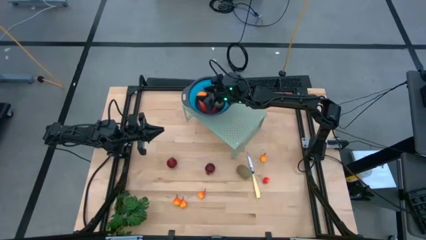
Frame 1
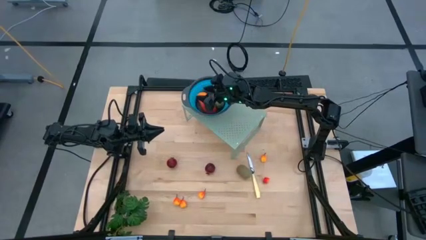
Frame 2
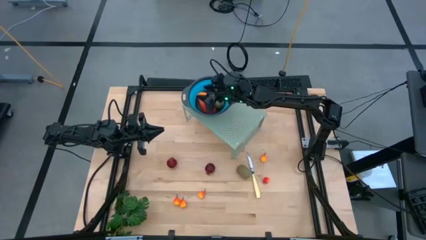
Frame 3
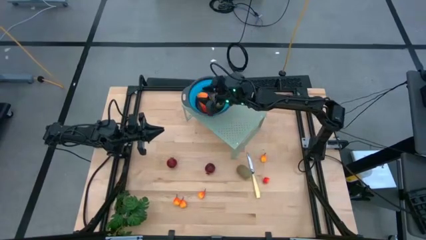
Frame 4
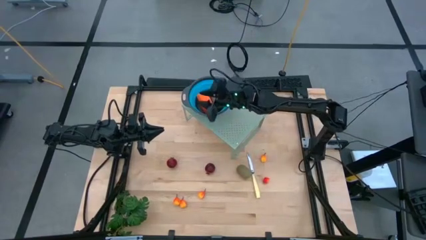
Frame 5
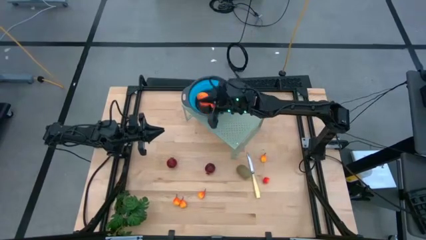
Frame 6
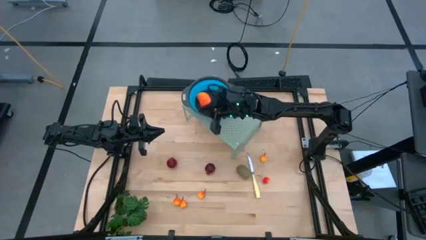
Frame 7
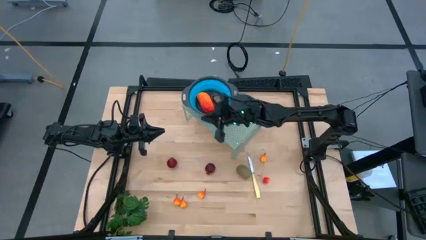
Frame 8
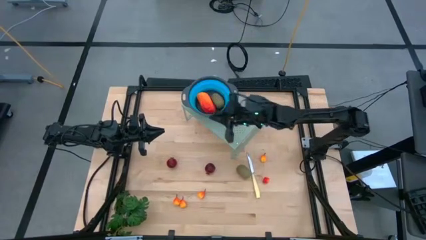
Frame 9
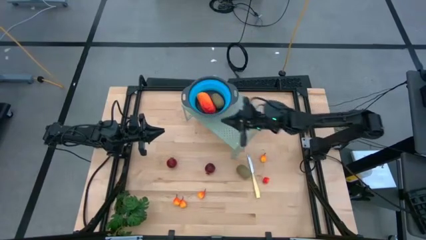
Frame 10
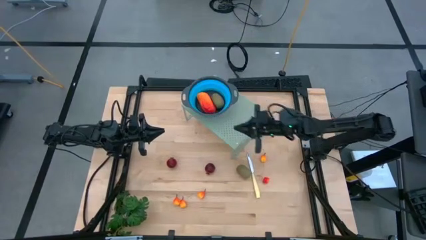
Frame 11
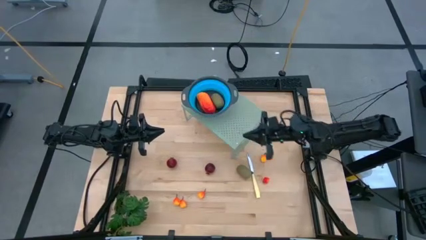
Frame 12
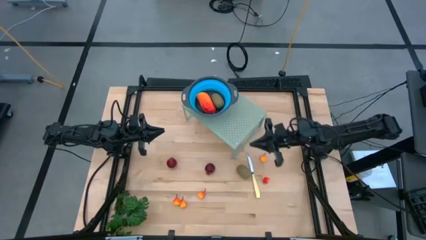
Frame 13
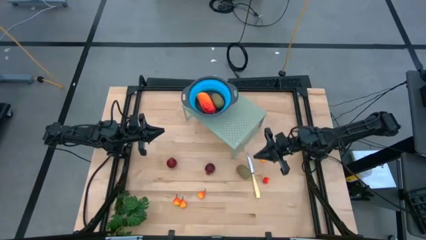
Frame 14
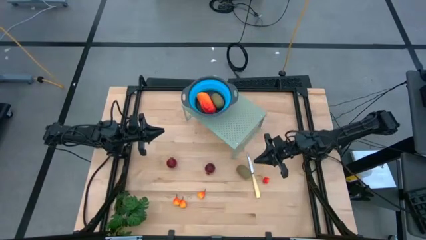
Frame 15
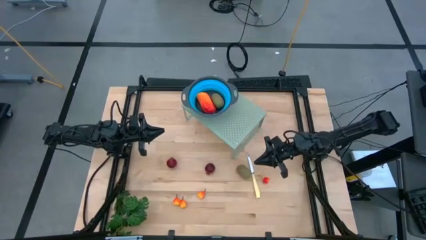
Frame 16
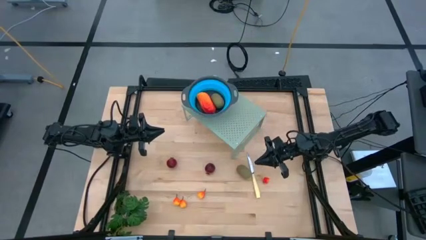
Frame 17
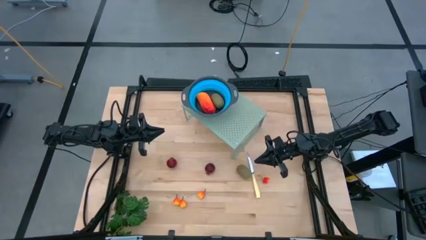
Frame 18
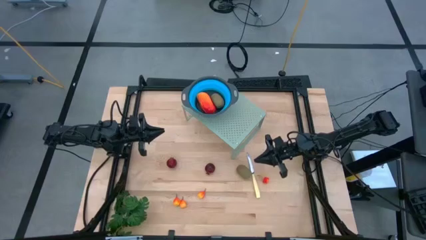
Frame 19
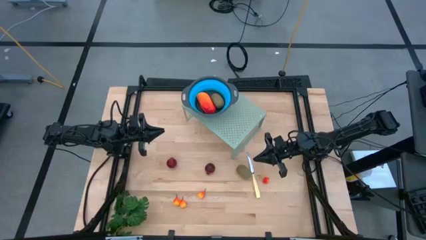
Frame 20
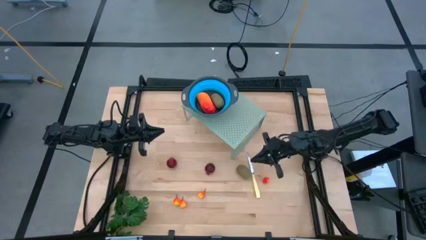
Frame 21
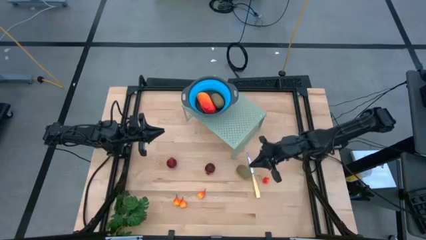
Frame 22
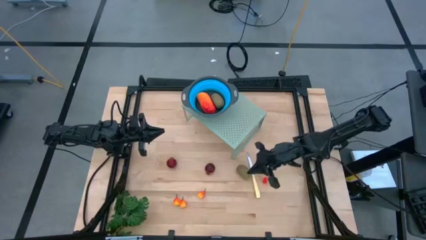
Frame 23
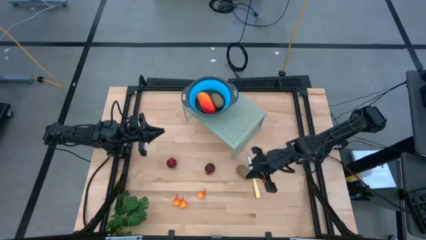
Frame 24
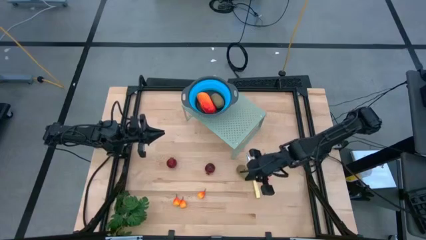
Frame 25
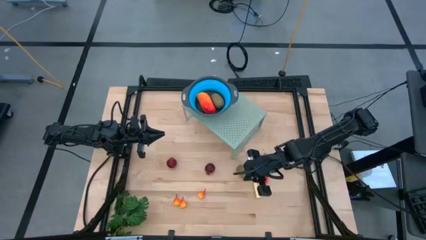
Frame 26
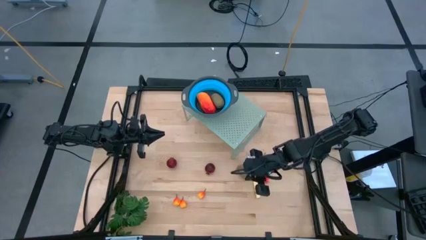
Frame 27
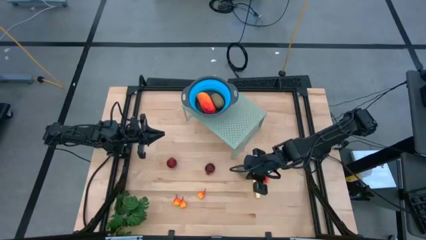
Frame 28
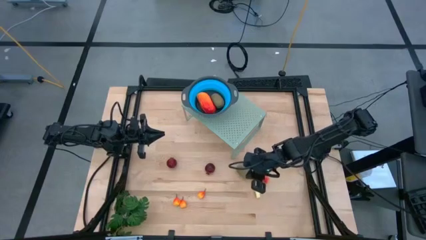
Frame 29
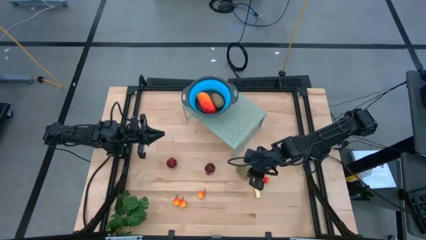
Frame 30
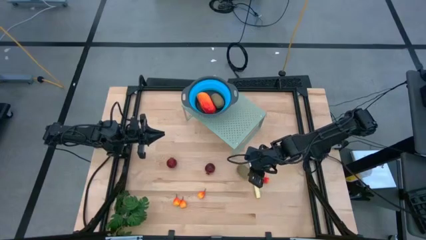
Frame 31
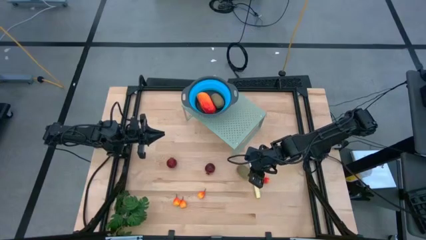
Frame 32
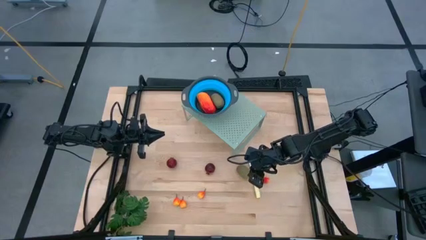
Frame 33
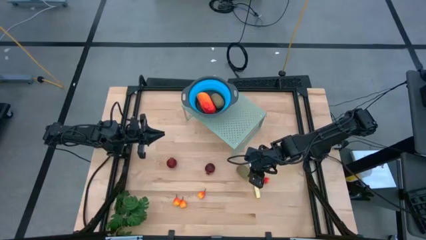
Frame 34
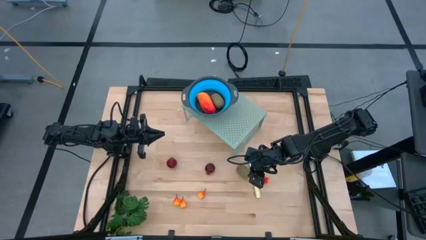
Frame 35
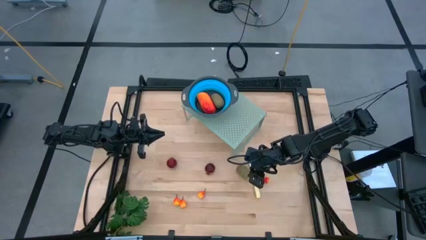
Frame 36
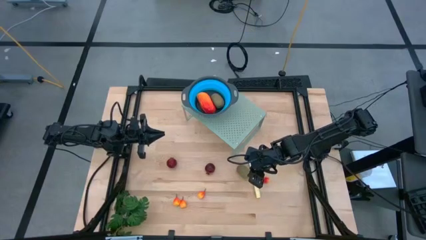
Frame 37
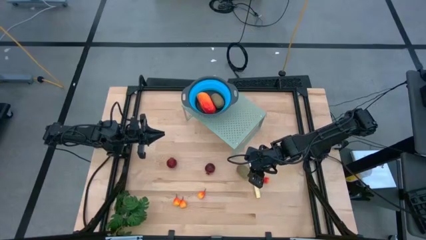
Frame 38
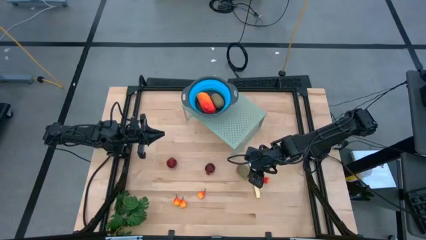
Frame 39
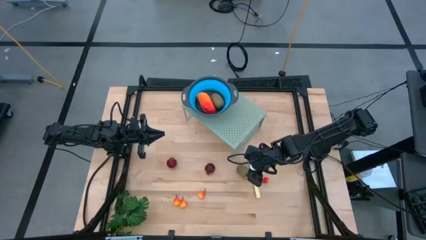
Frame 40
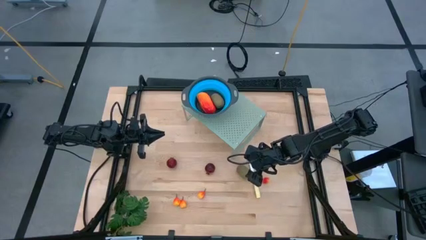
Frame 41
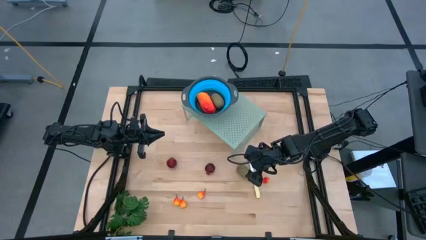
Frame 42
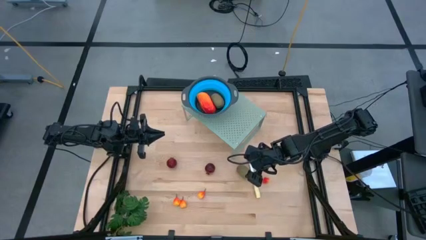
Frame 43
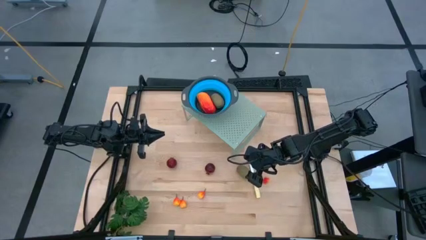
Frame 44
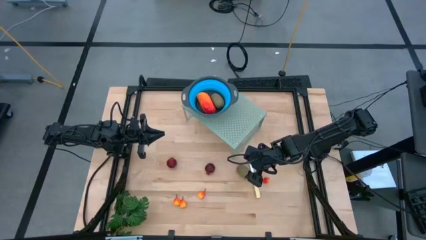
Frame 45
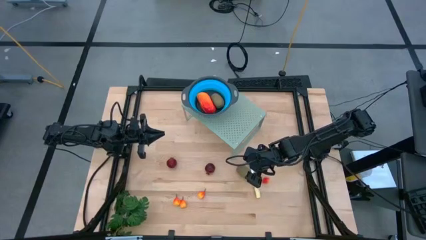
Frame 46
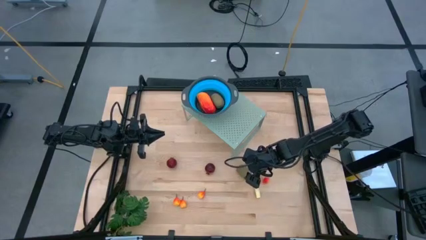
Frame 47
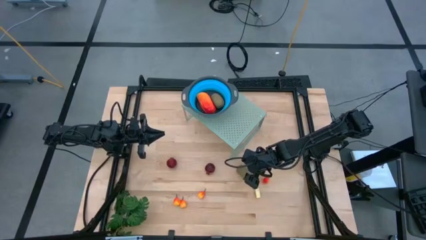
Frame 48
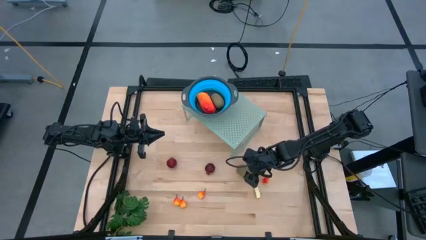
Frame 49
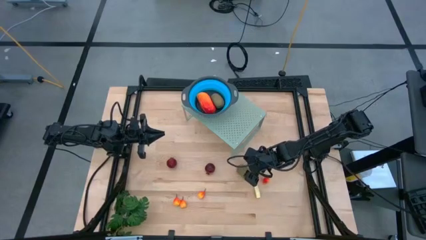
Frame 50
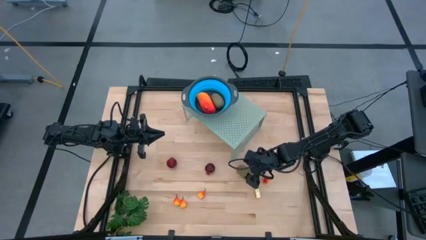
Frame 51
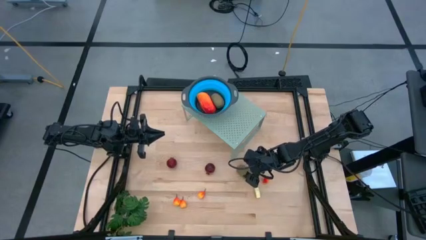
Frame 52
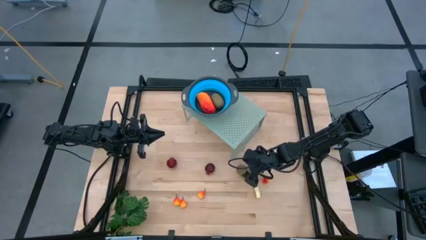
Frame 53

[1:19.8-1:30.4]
Task: Pick & Place Fruit
Put the kiwi into the blue strainer bowl on the shelf

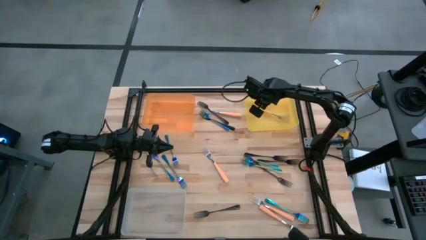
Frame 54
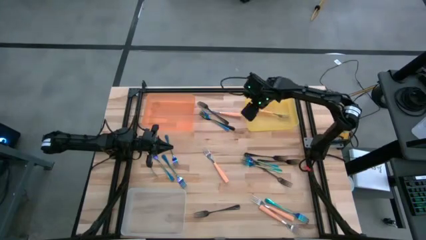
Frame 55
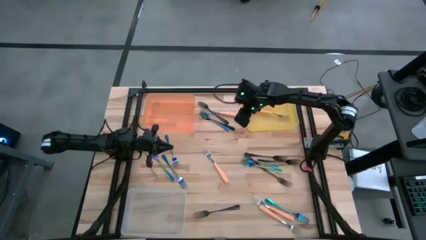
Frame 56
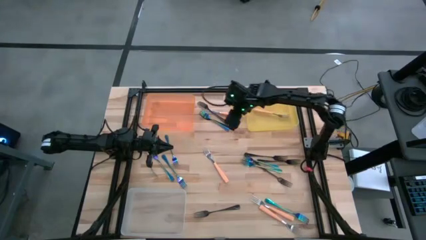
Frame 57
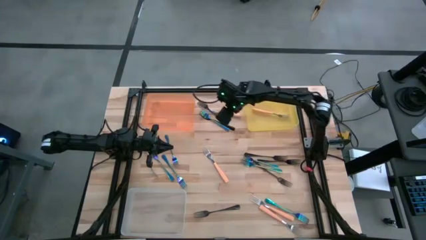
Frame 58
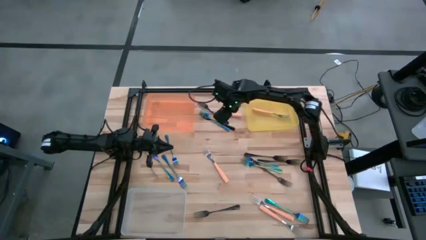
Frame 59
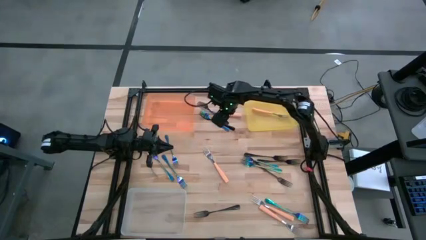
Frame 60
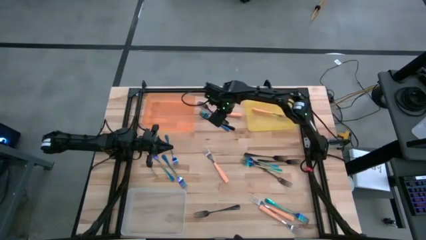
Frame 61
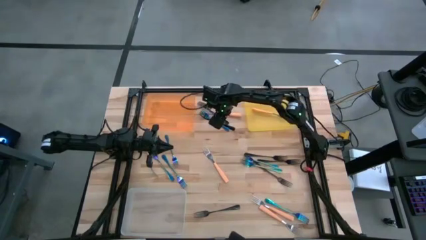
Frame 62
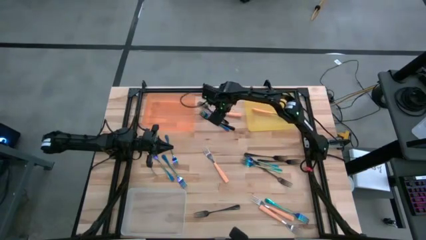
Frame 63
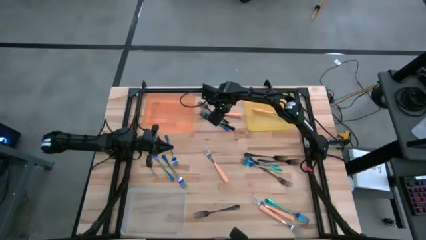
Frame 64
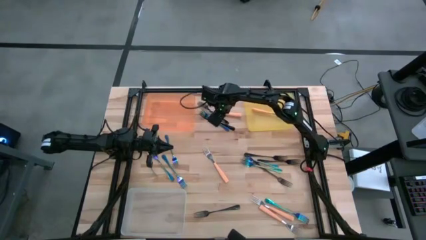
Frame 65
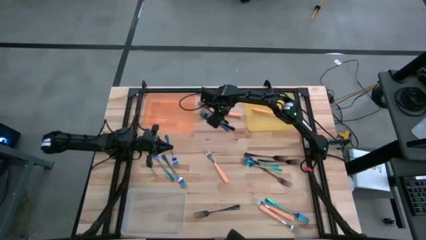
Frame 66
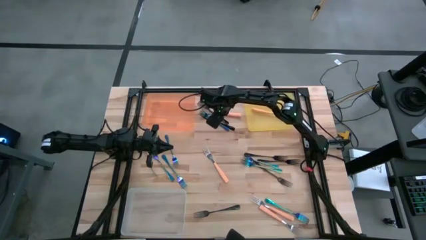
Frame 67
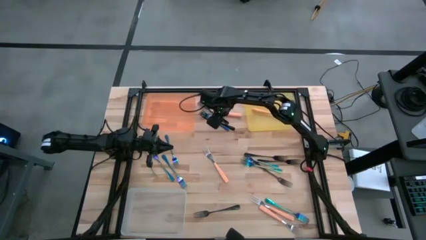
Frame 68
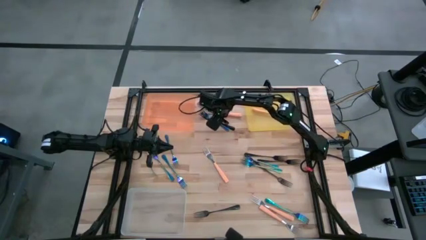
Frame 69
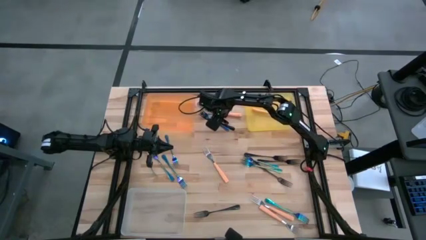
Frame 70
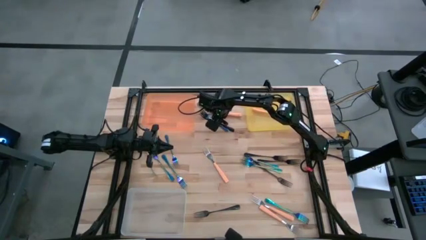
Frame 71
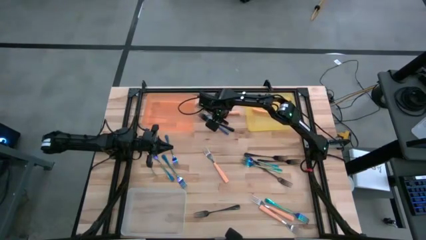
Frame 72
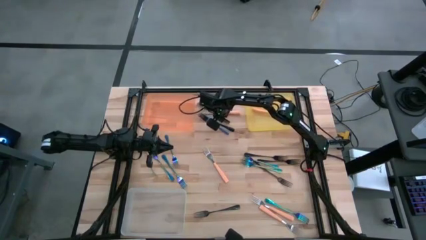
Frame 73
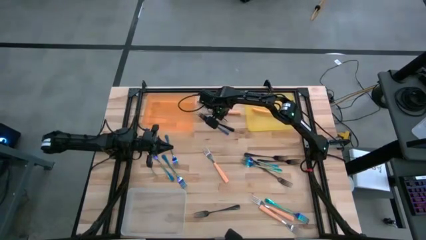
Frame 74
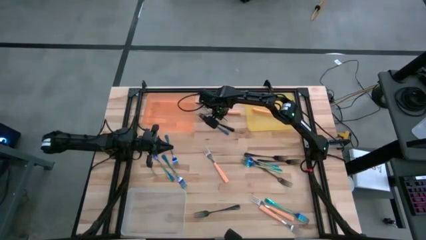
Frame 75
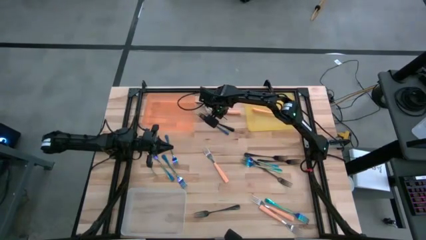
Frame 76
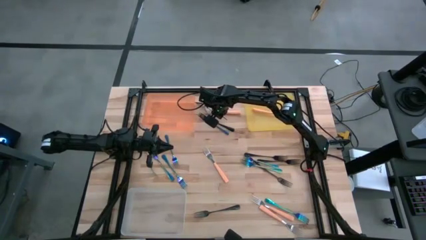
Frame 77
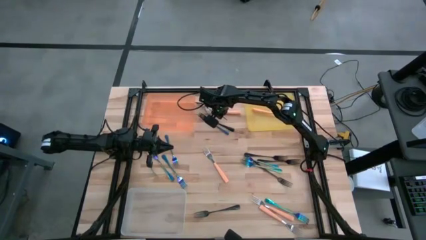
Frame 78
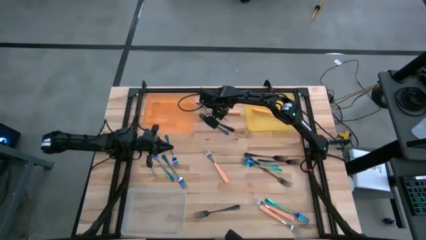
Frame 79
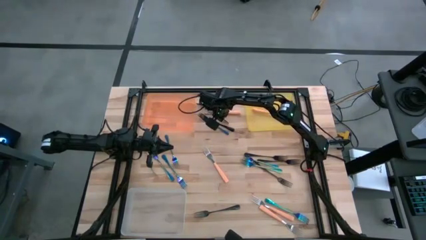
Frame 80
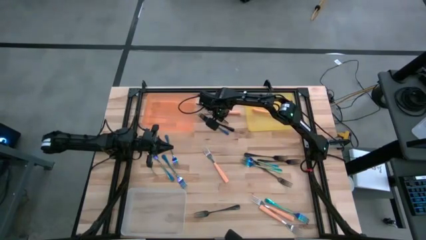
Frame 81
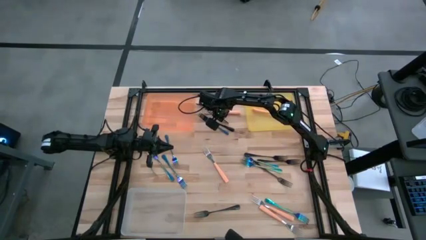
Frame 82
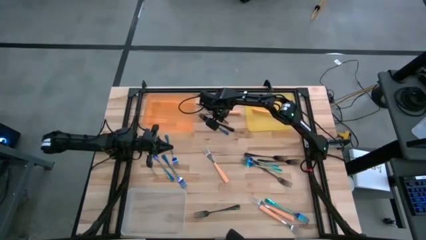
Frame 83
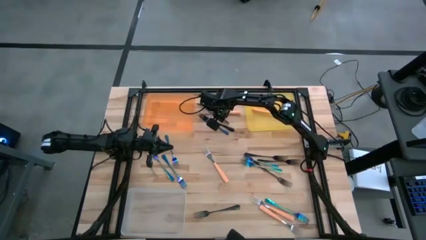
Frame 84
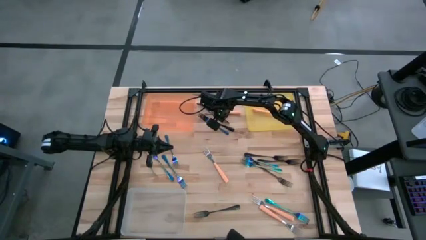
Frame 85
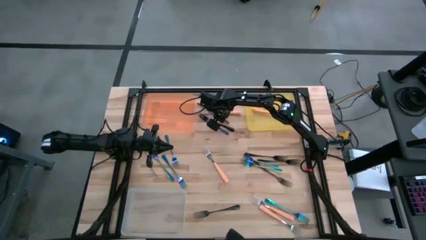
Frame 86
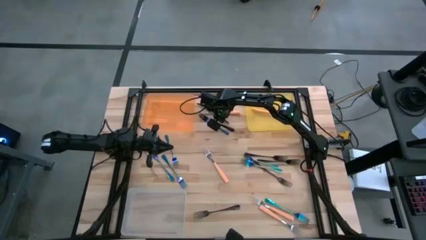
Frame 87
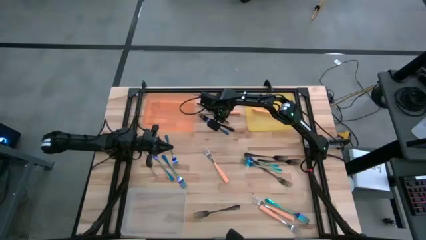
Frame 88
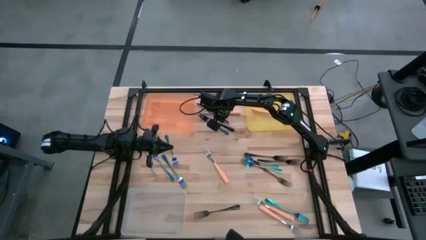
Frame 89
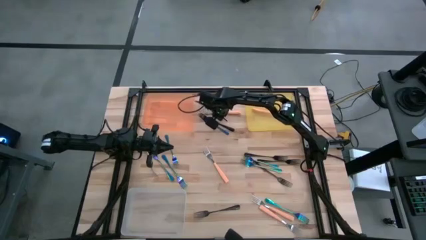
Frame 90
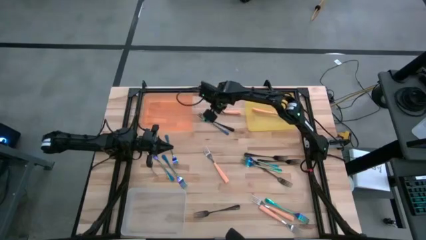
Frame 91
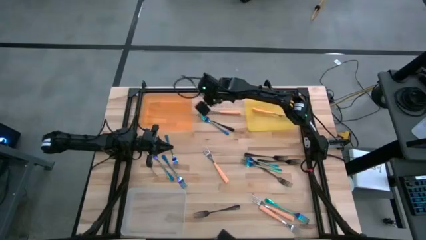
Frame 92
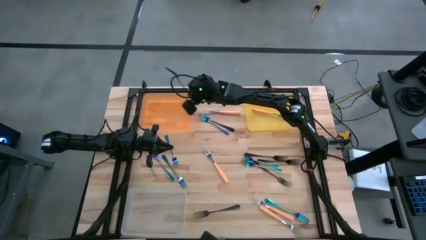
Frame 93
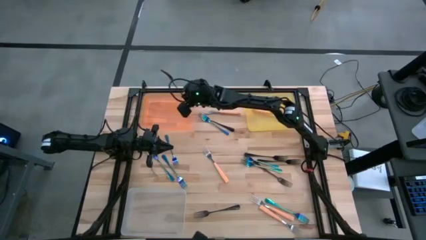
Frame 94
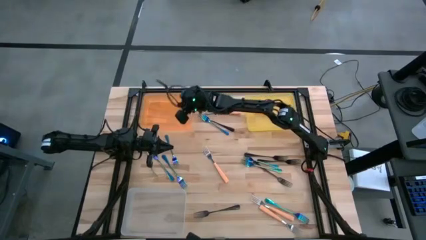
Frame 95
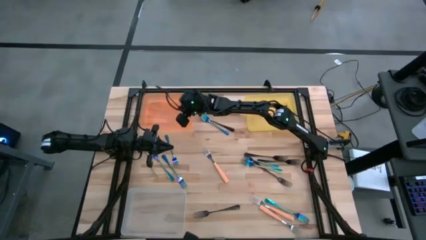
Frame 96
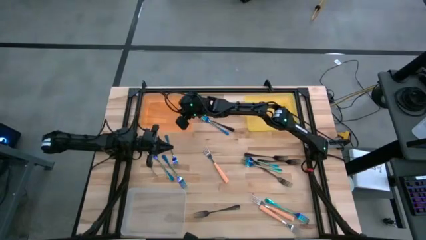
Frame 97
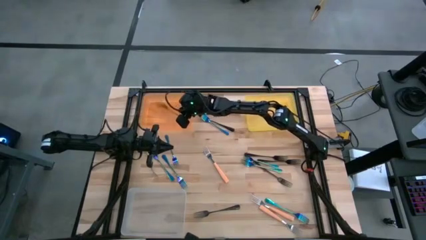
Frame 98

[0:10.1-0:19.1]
Task: Sort silverware by color (type)
Put the black fork into the orange bin
